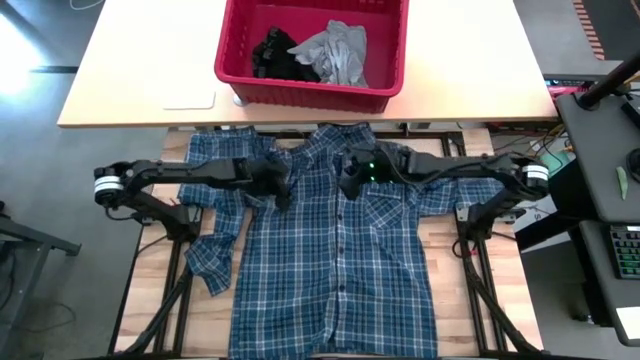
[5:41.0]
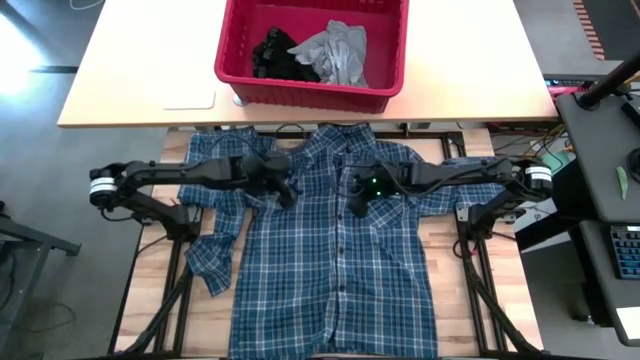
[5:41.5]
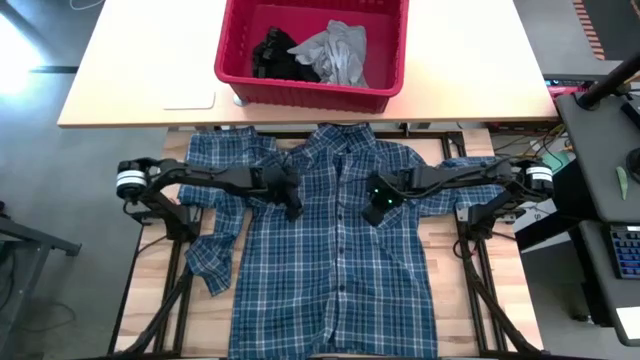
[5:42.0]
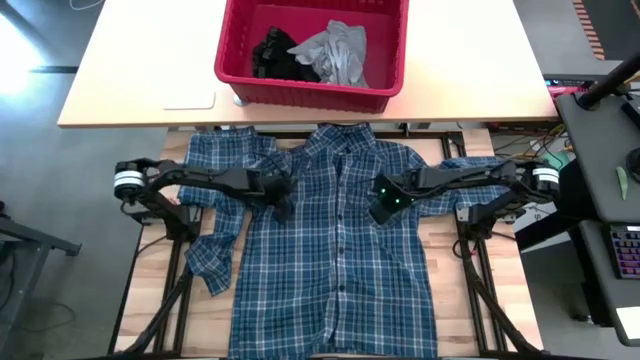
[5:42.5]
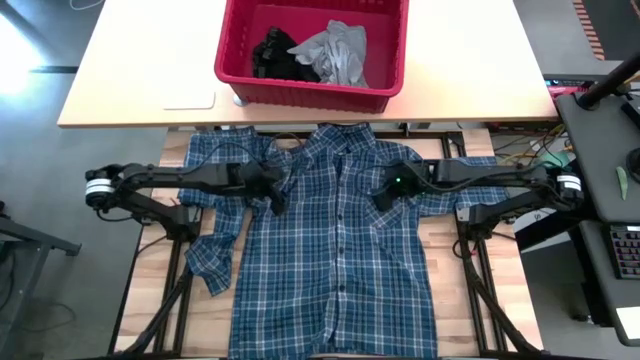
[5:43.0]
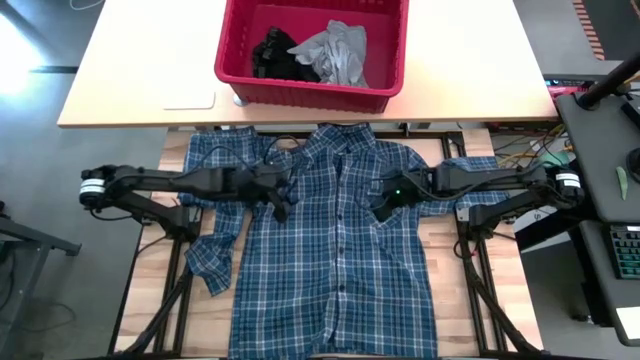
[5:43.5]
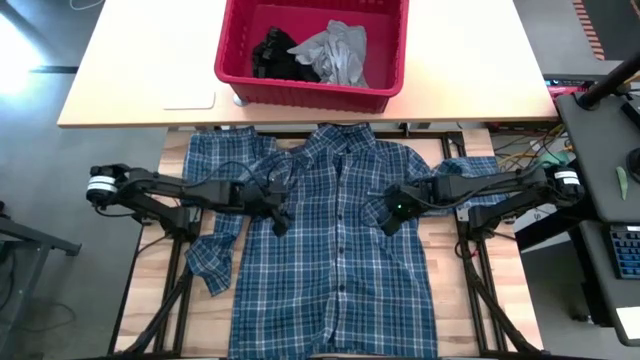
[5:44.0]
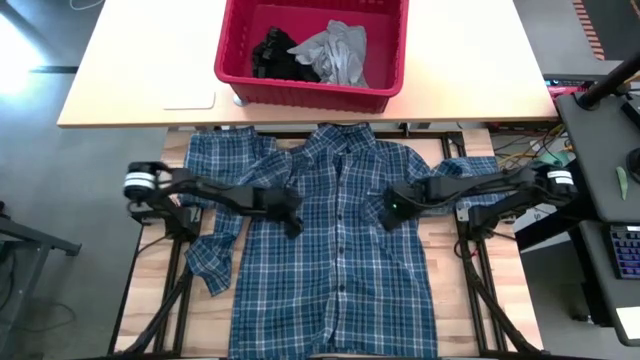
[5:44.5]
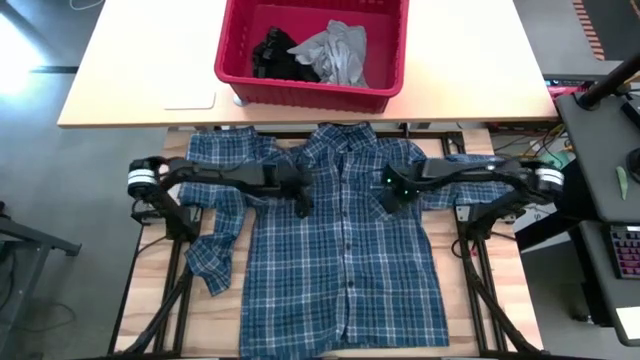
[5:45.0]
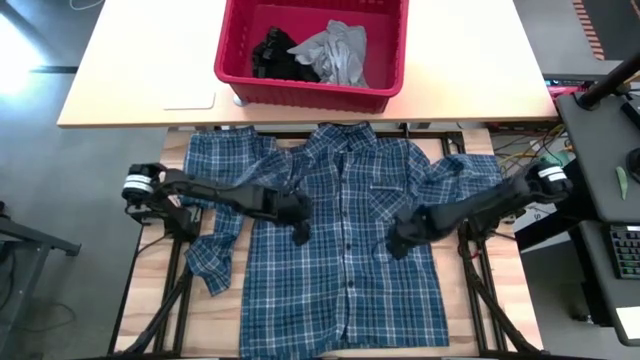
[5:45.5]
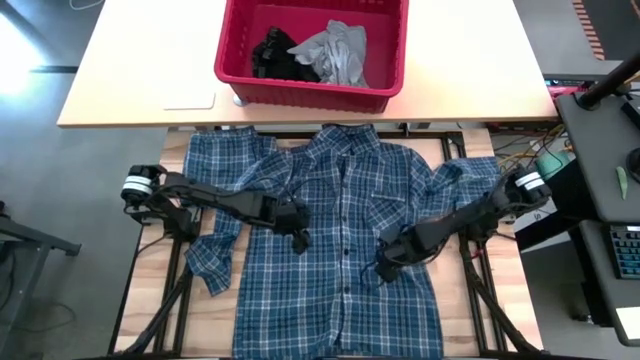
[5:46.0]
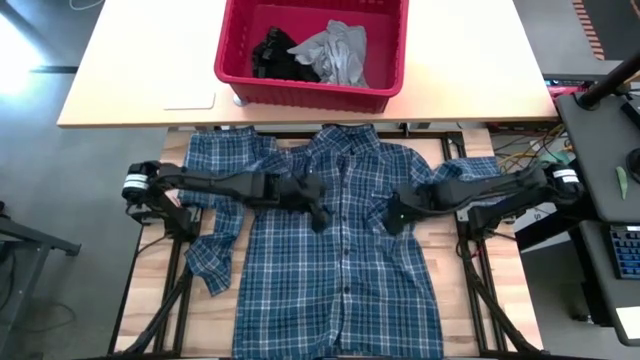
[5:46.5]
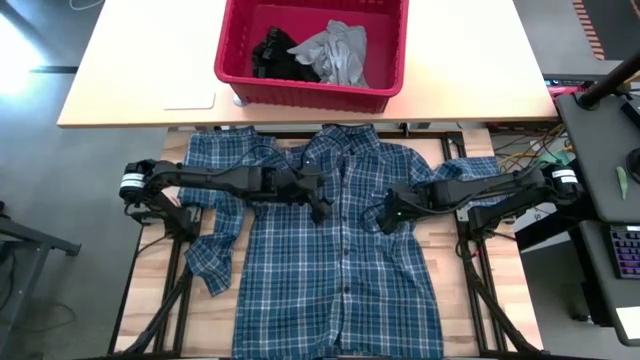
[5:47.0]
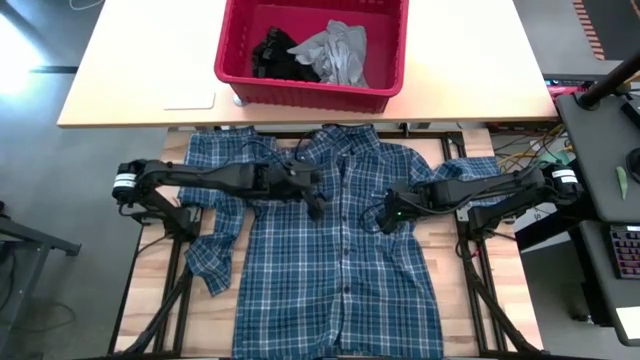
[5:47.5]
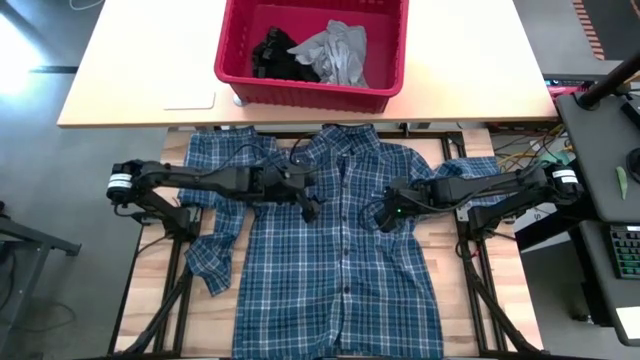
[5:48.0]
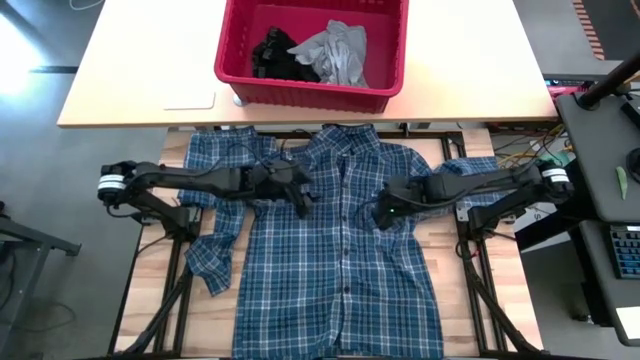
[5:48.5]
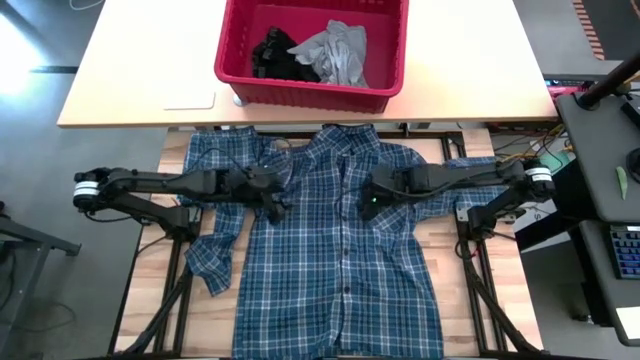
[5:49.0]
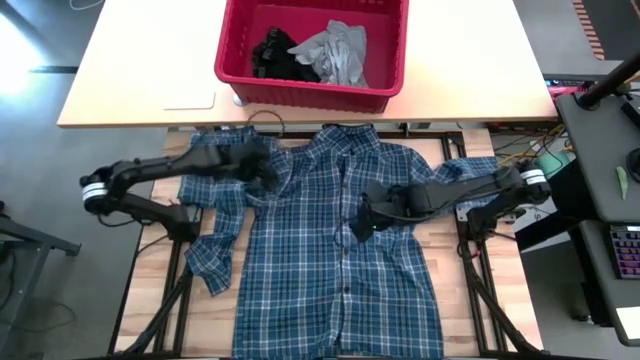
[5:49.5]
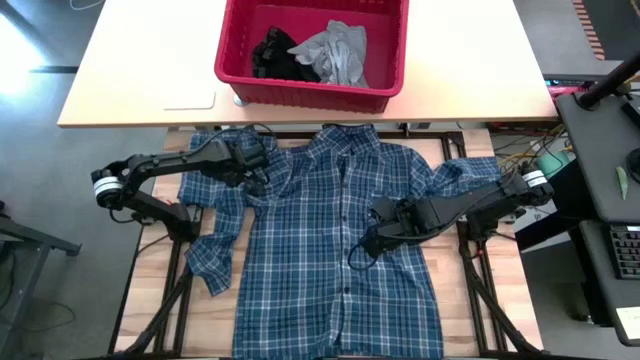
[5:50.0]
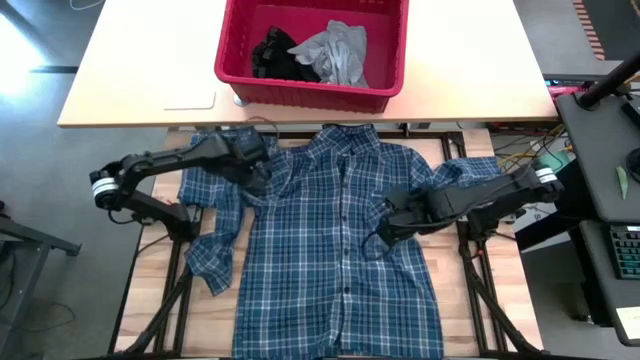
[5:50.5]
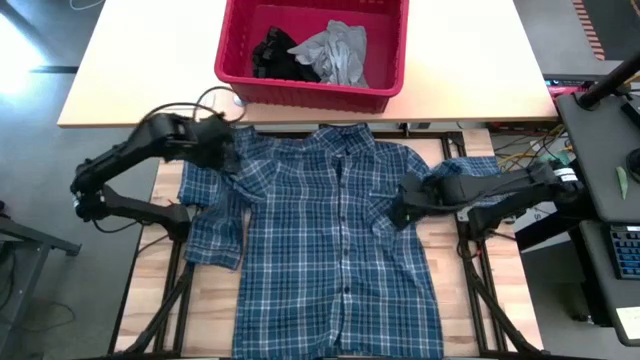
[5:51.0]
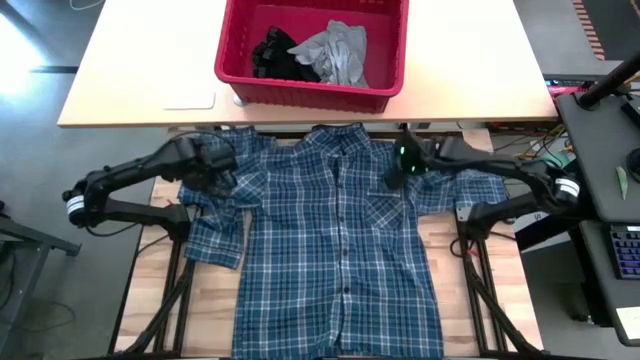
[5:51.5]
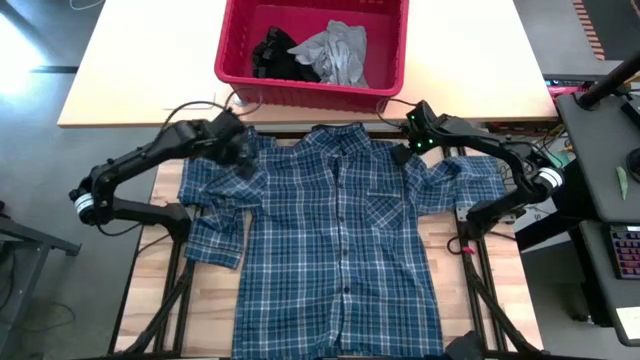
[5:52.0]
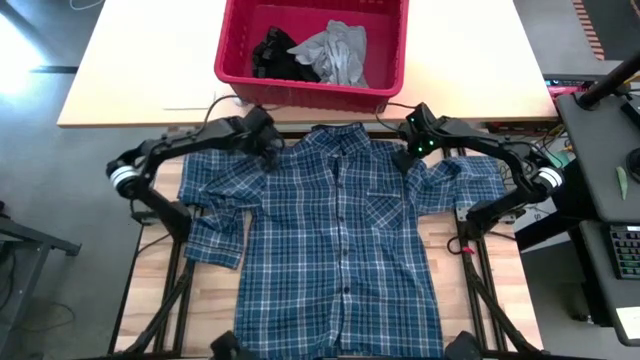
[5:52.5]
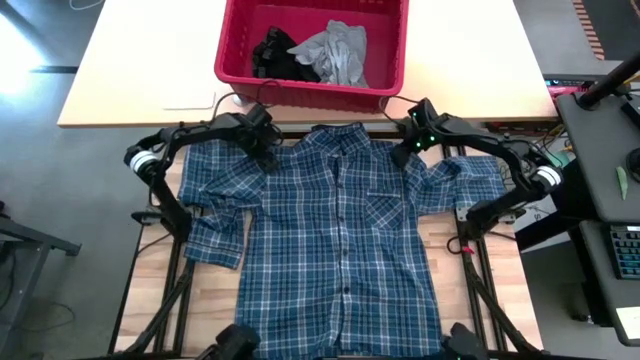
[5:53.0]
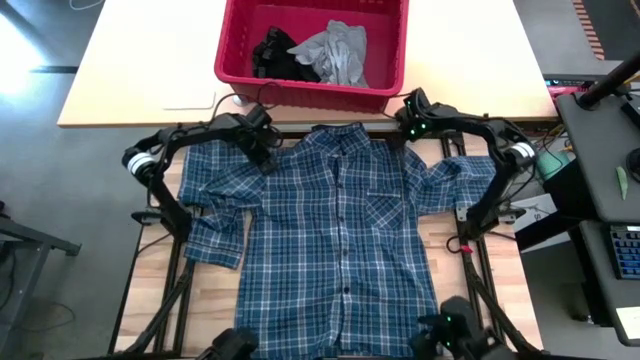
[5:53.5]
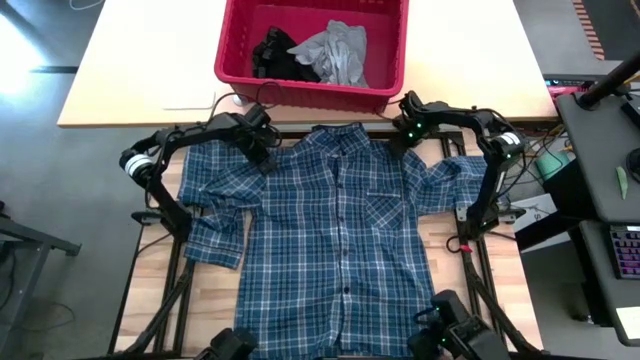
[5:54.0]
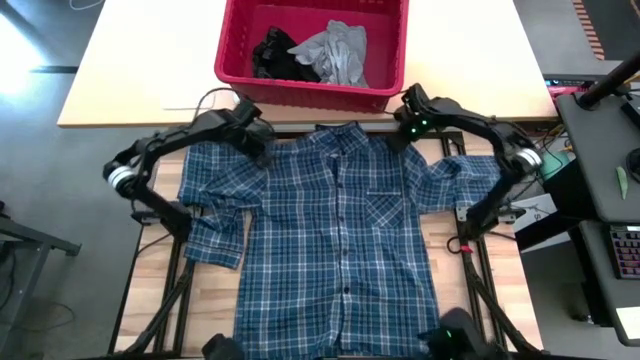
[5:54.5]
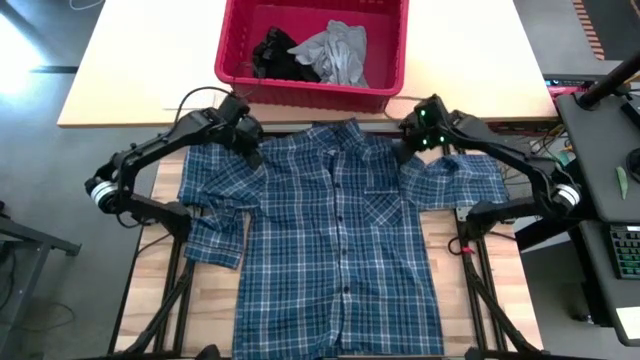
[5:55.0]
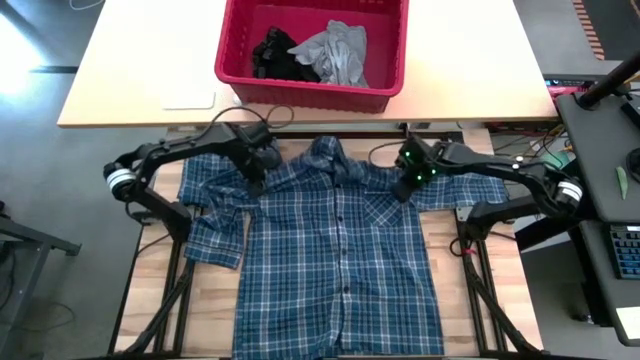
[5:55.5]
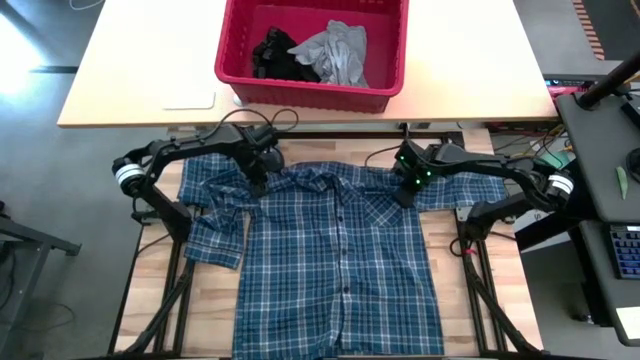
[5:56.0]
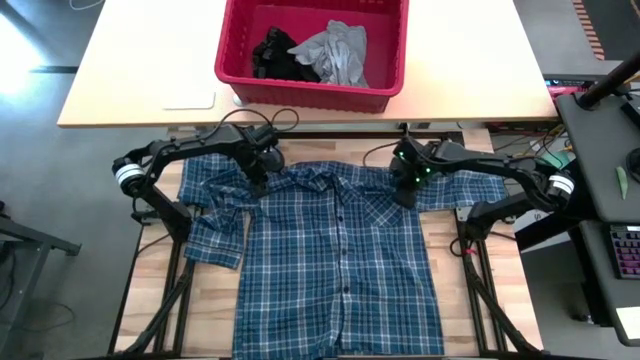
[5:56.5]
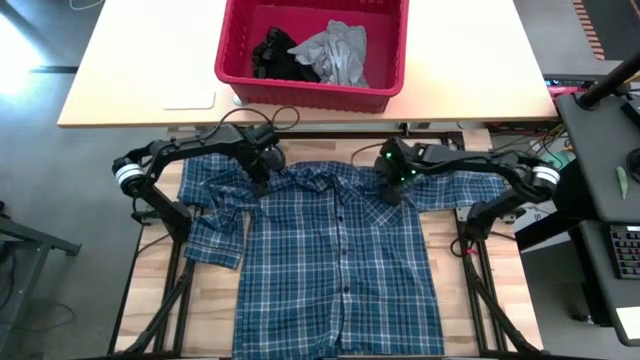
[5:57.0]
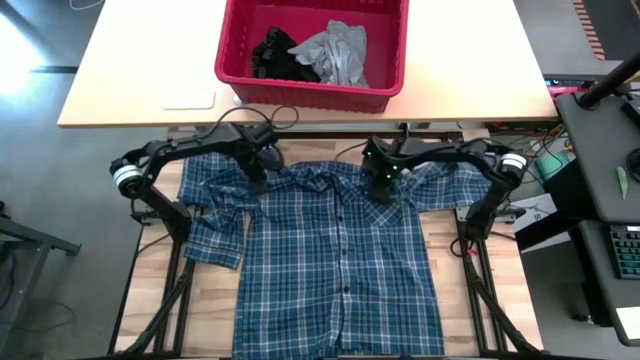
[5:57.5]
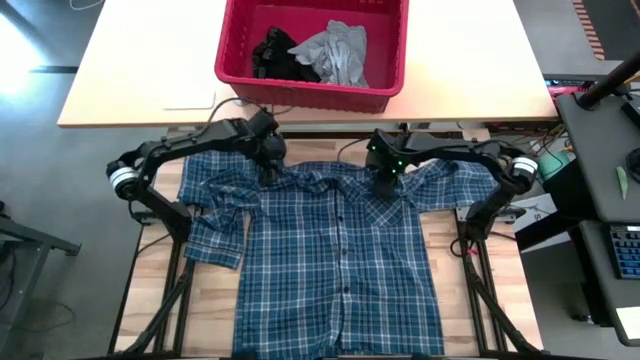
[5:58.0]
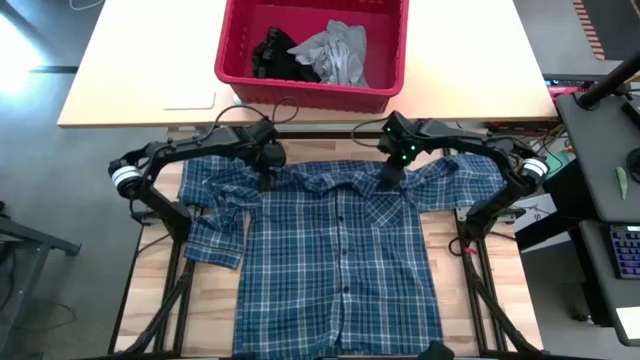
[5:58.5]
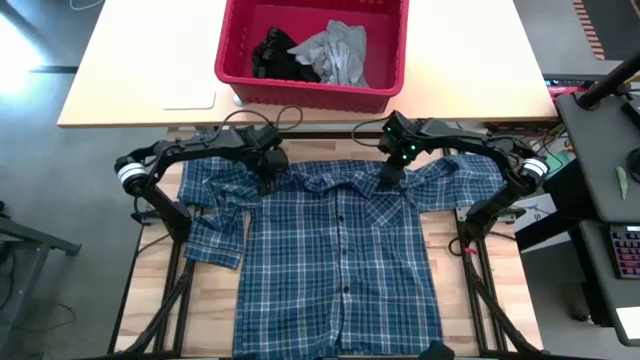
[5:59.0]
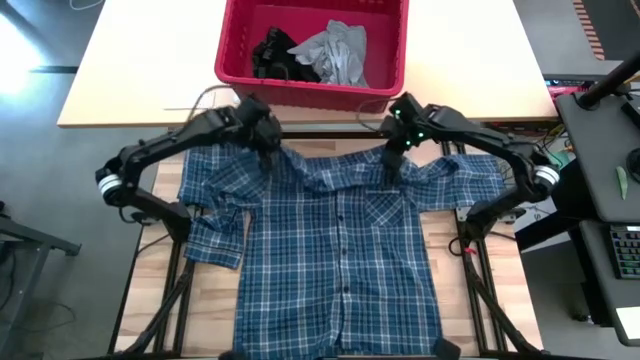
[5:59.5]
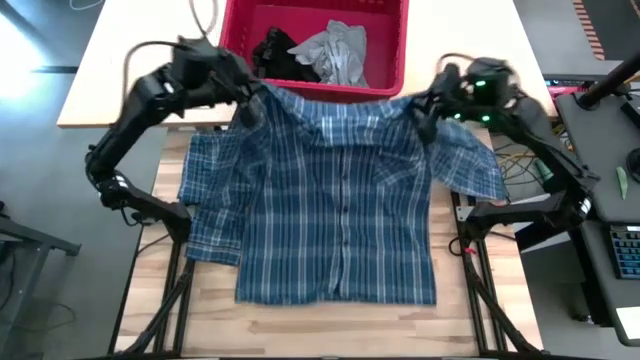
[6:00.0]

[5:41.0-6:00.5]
Task: Fold Laundry from Bin
Fold the blue patterned long sleeve shirt

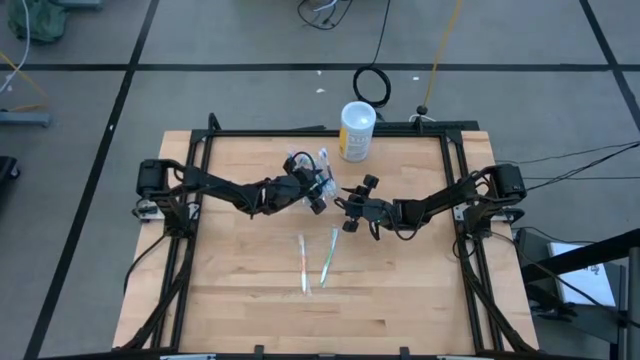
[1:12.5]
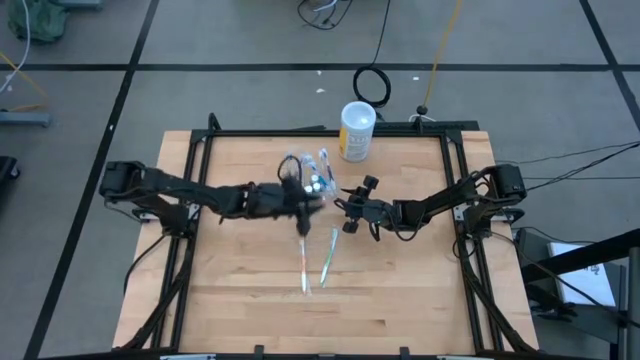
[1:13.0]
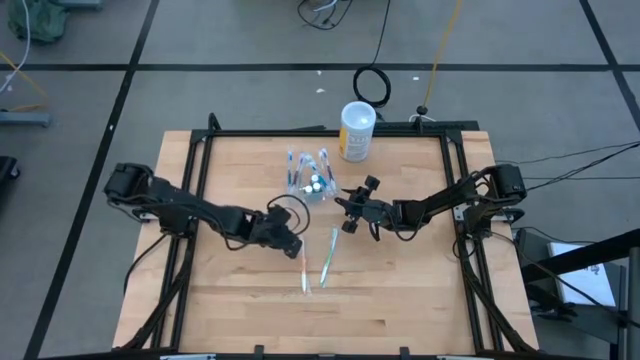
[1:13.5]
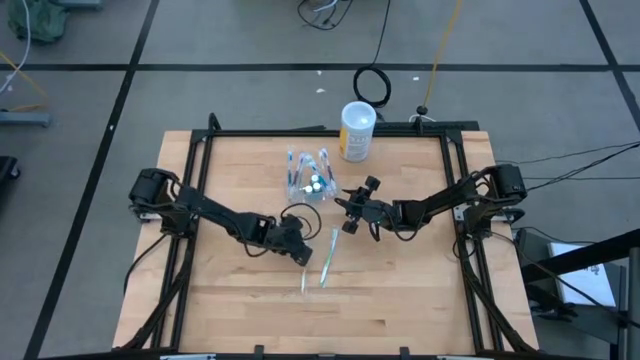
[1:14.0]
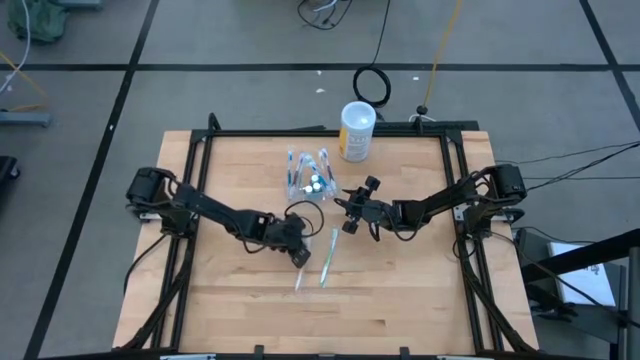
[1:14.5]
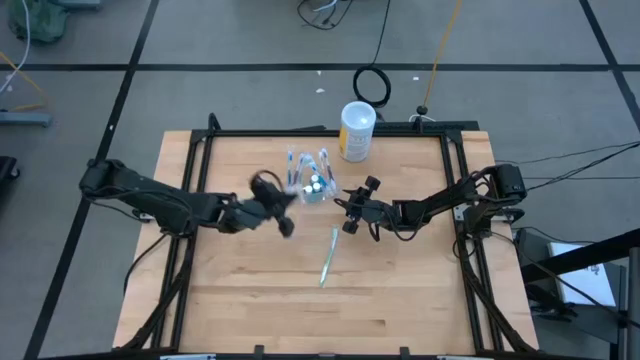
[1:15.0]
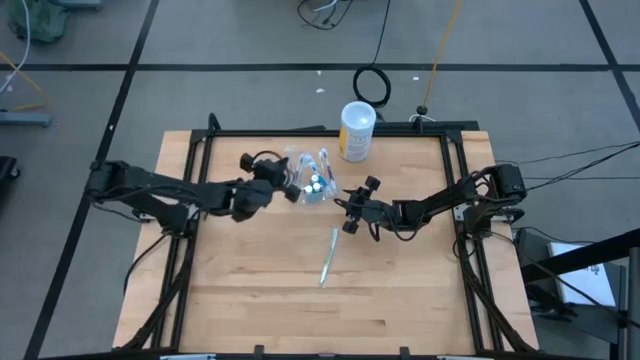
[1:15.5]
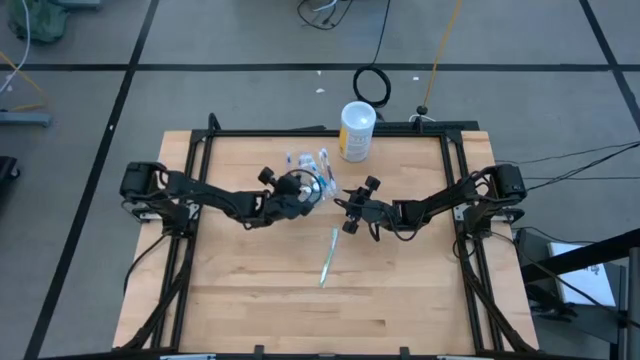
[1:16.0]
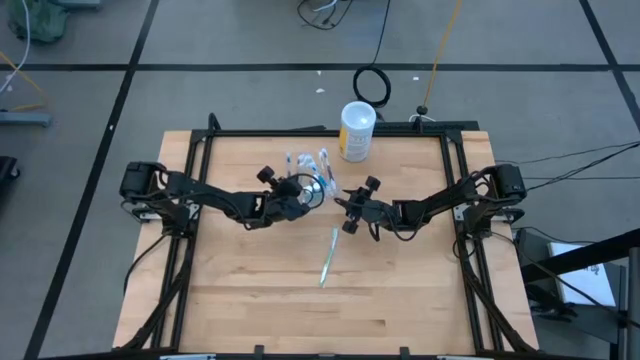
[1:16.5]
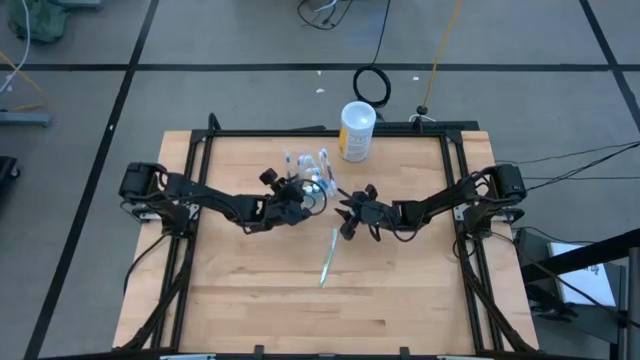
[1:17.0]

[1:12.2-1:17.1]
Task: Pick & Place toothbrushing station
Put the orange toothbrush into the transparent organizer
